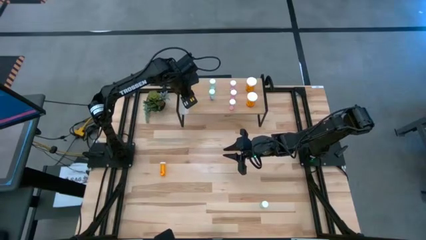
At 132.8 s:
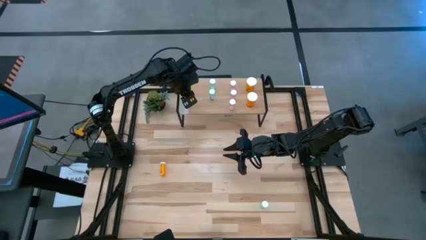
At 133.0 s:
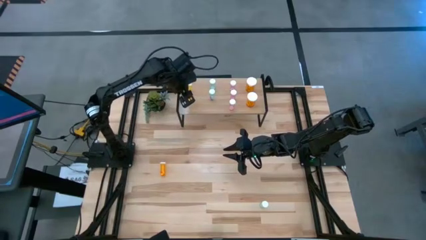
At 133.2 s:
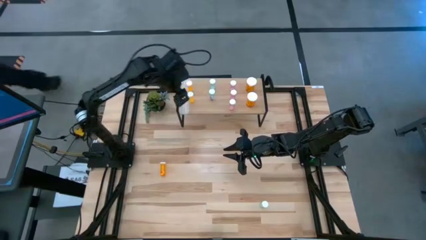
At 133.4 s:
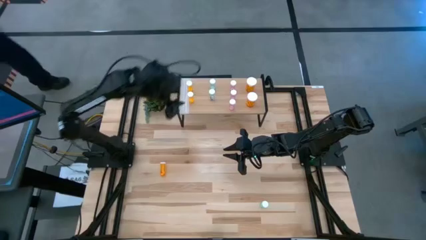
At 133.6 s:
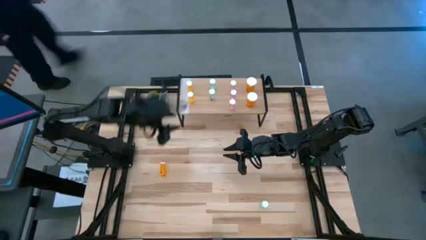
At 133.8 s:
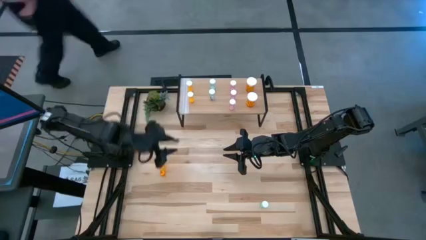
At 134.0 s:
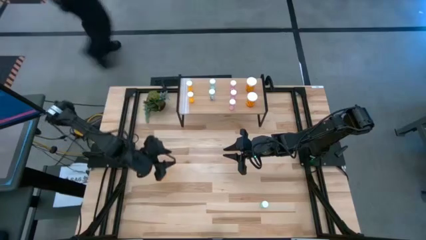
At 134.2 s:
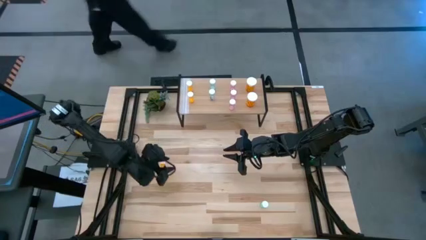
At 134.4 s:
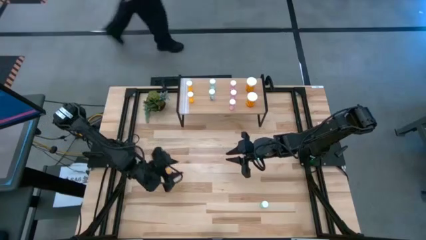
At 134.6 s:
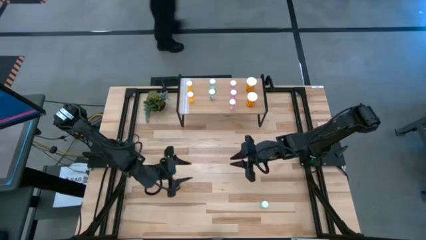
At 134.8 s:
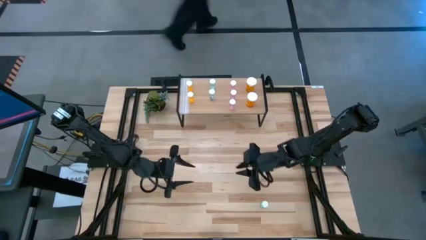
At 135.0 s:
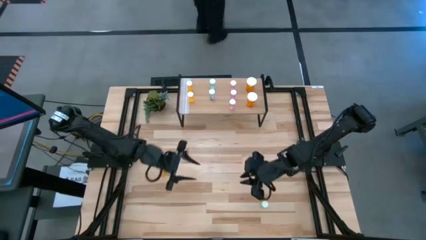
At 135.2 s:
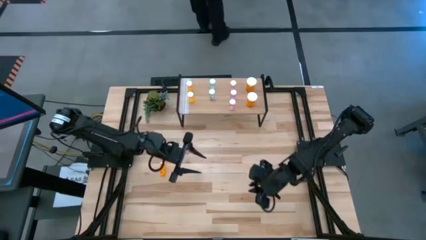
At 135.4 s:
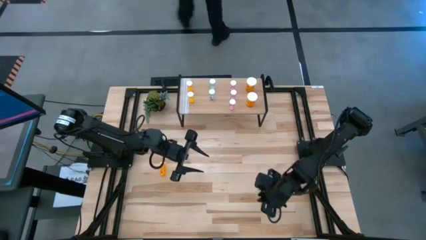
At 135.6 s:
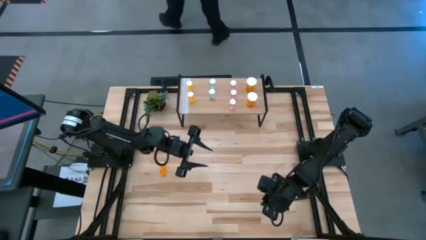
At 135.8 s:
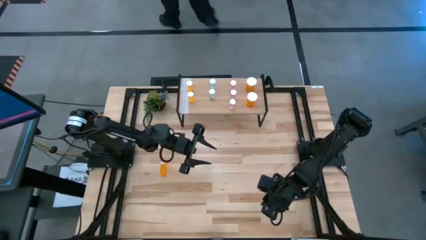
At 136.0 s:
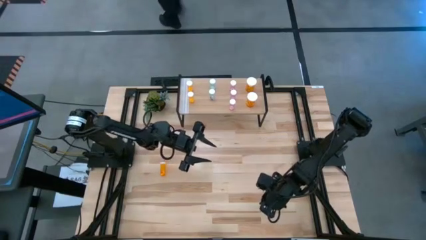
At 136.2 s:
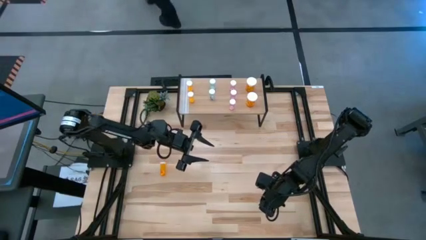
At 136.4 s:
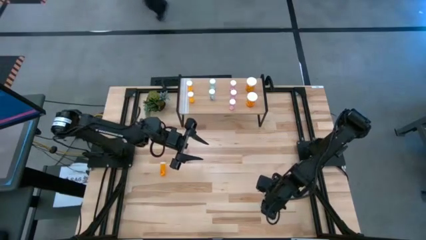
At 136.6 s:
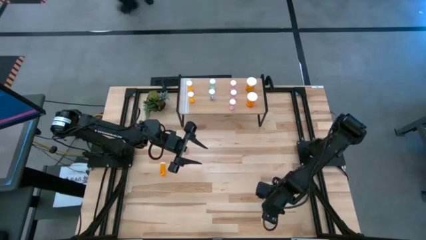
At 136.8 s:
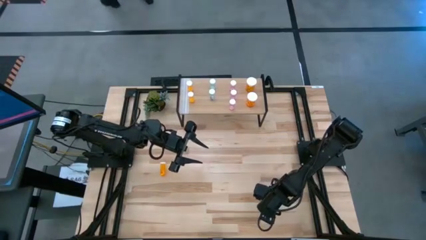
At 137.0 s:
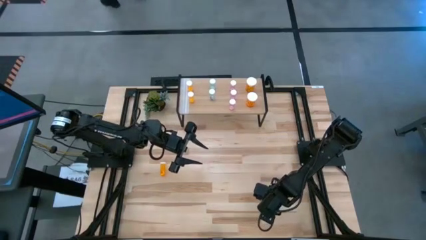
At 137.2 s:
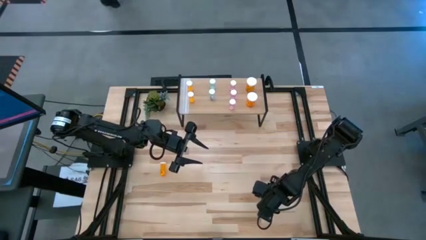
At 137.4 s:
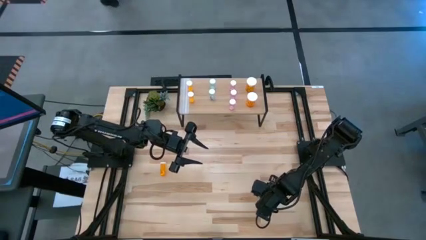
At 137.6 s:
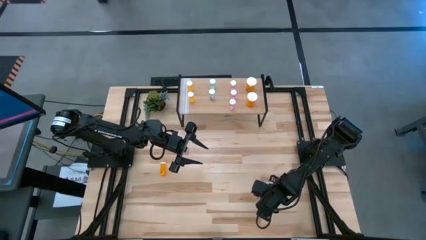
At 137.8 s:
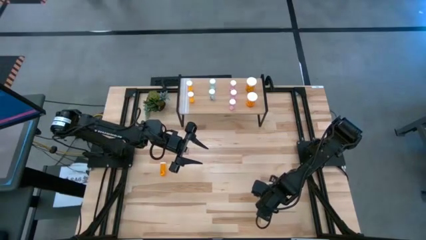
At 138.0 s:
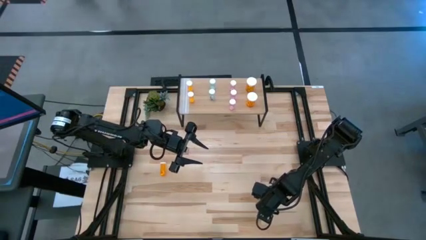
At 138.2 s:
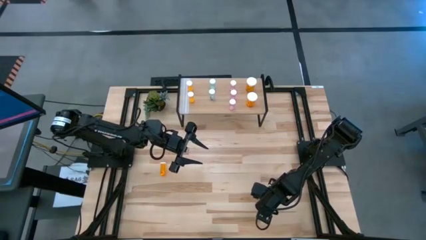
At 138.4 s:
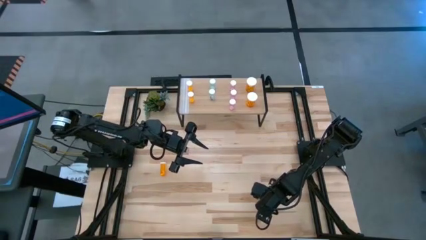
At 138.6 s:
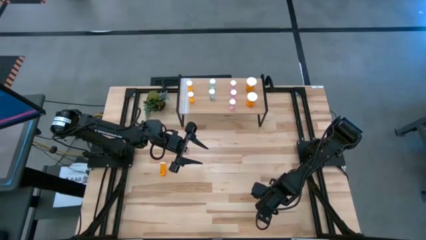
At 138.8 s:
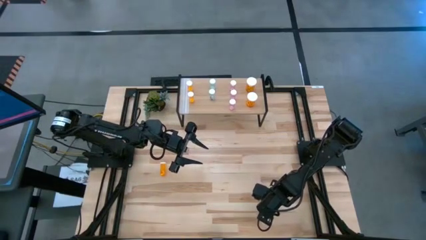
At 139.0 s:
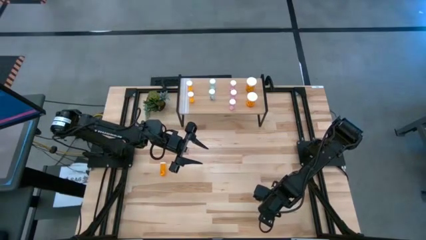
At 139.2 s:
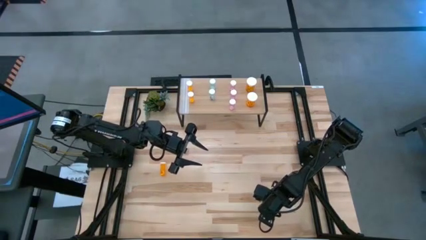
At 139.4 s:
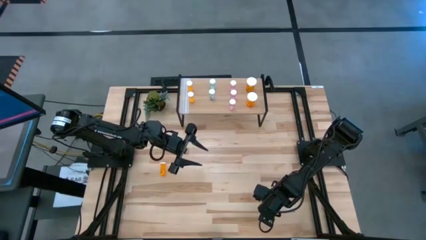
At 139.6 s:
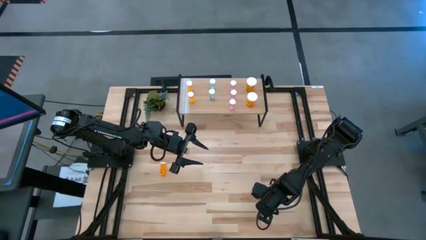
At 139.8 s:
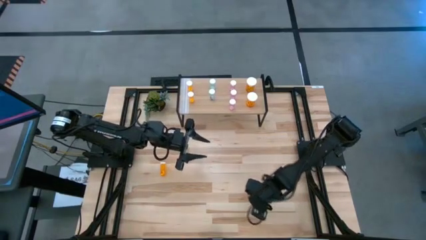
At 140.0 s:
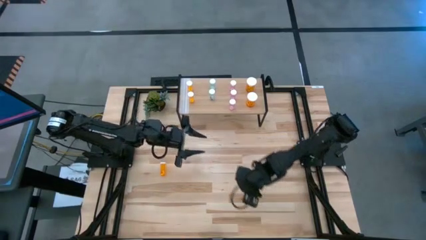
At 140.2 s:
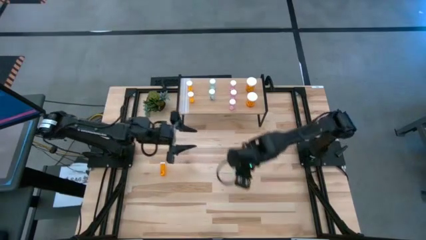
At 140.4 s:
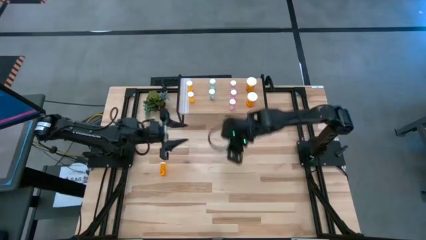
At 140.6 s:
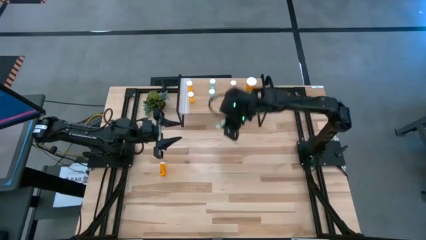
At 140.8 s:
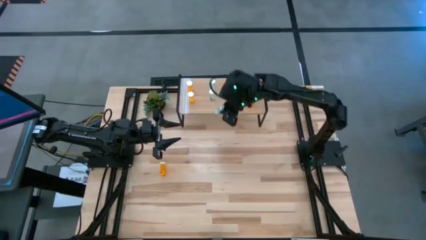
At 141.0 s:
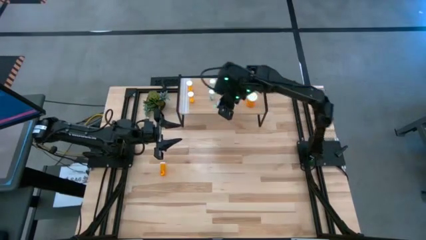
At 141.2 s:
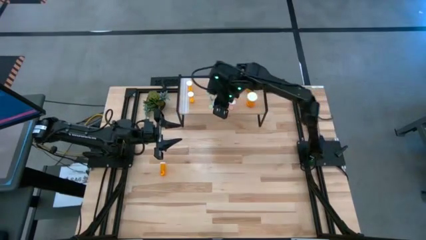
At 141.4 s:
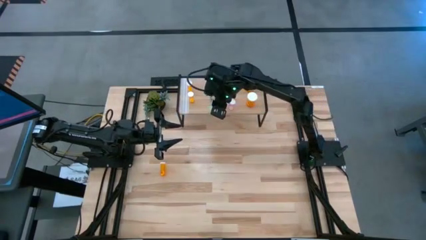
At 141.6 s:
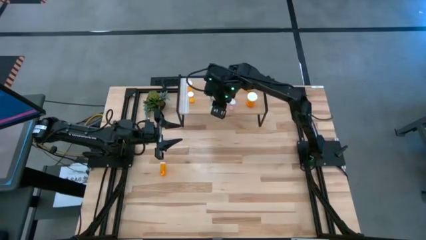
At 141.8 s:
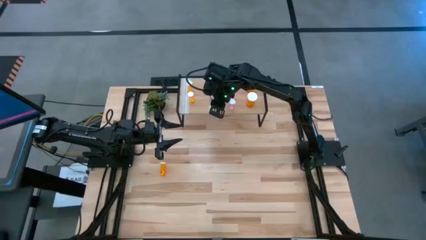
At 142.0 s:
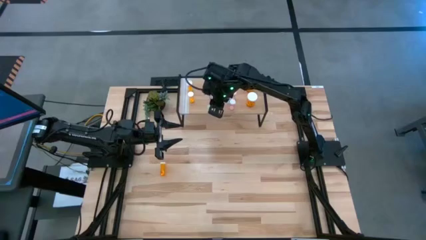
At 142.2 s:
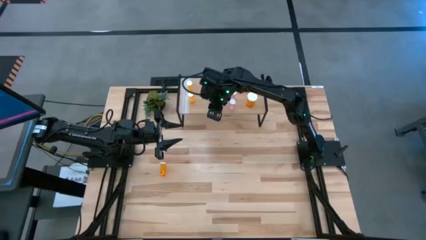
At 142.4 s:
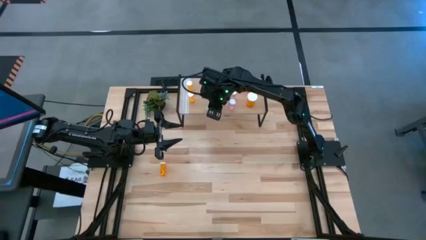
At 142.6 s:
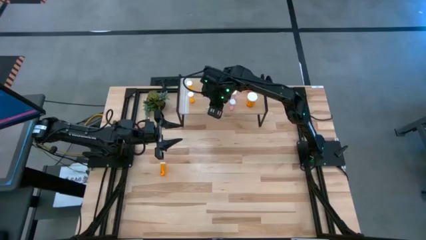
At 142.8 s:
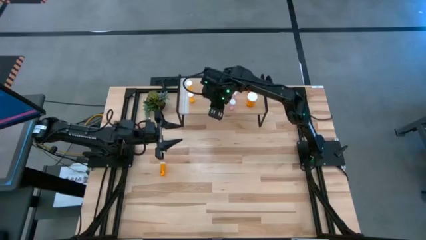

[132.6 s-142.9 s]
Task: Pick and place medicine bottles onto shelf by color
Put the green pill bottle on the shelf aligned with the other green pill bottles
